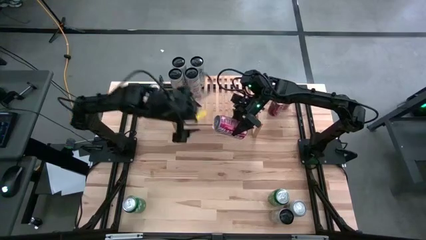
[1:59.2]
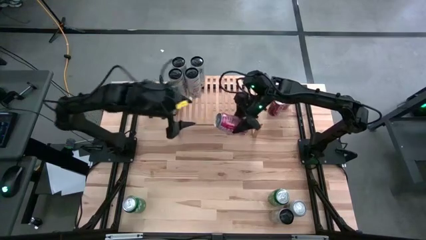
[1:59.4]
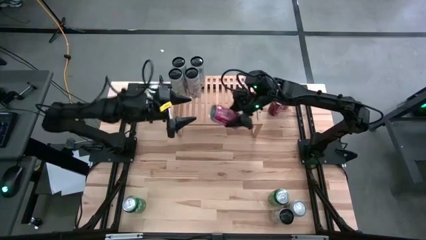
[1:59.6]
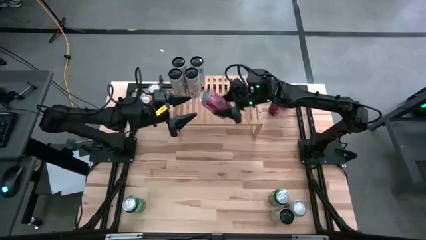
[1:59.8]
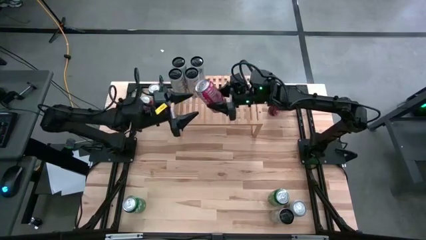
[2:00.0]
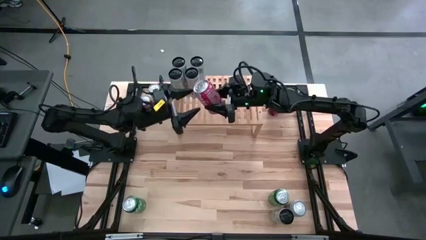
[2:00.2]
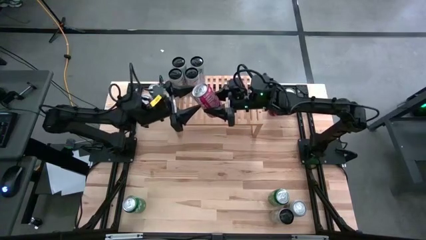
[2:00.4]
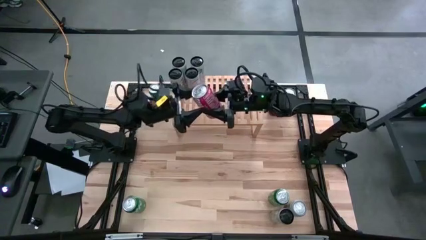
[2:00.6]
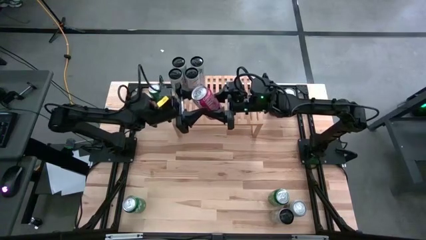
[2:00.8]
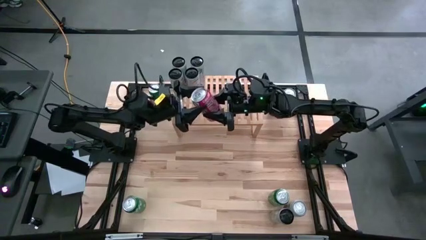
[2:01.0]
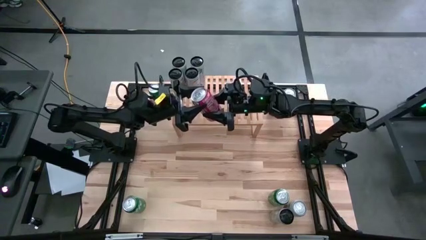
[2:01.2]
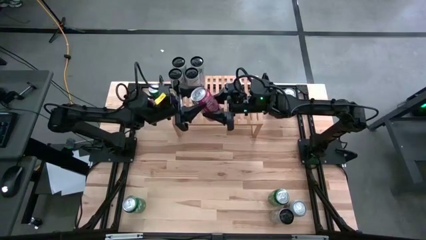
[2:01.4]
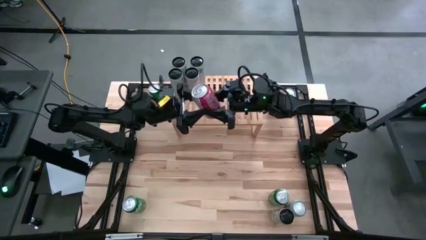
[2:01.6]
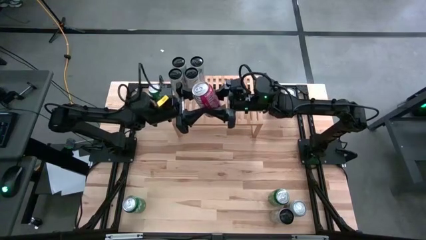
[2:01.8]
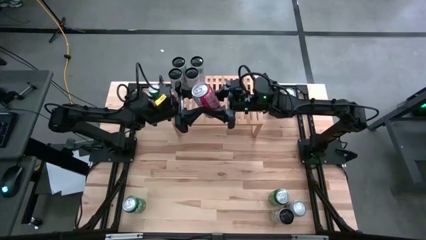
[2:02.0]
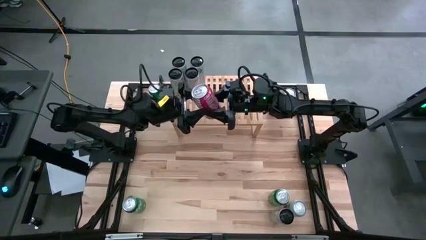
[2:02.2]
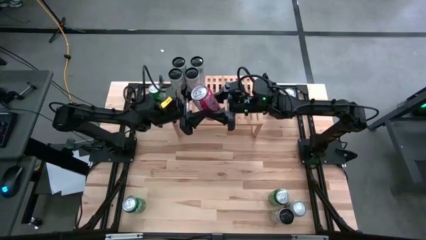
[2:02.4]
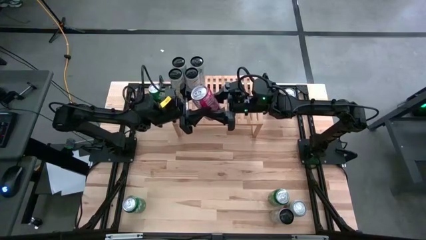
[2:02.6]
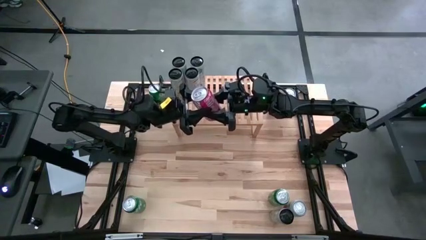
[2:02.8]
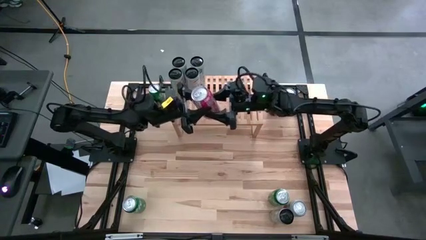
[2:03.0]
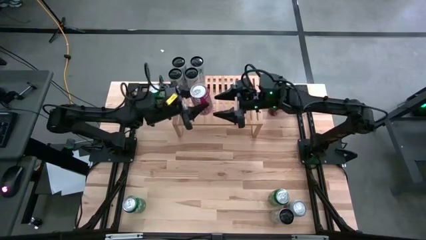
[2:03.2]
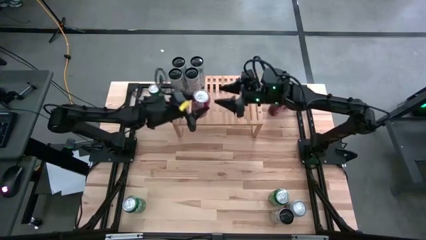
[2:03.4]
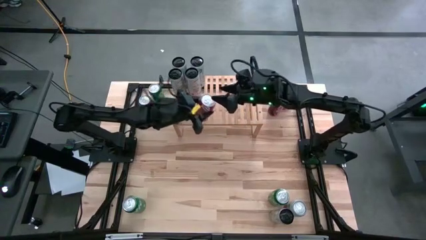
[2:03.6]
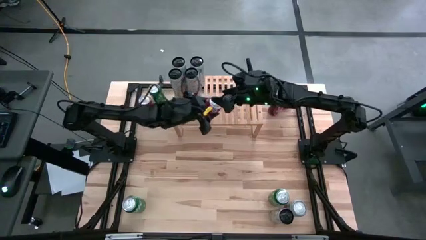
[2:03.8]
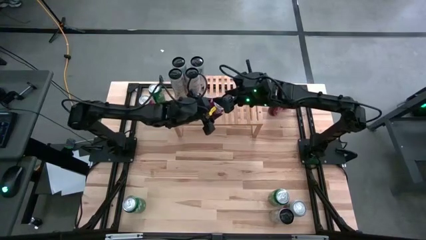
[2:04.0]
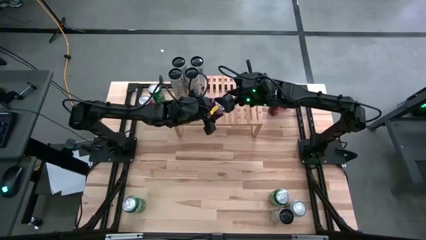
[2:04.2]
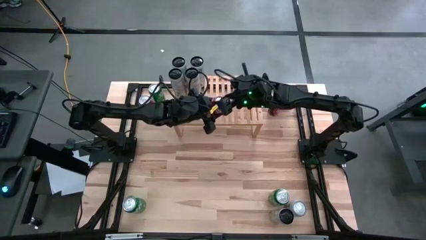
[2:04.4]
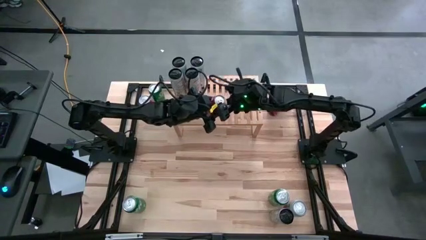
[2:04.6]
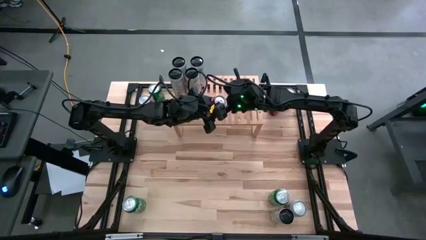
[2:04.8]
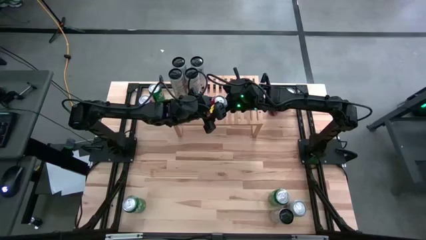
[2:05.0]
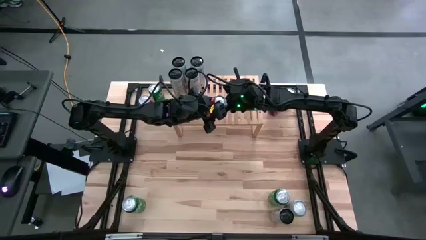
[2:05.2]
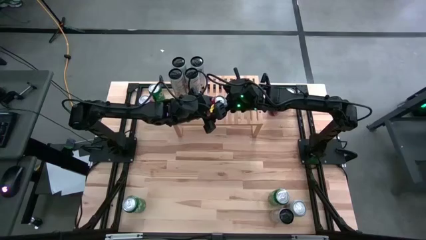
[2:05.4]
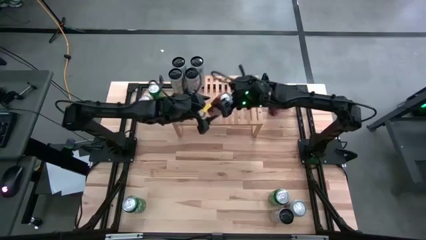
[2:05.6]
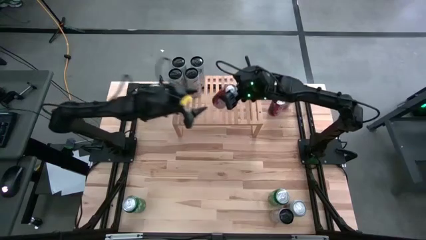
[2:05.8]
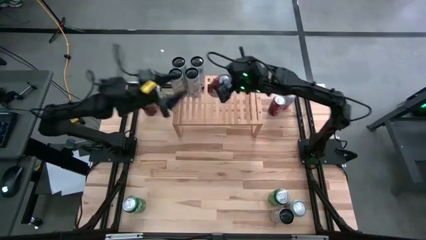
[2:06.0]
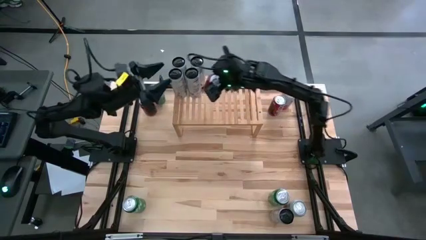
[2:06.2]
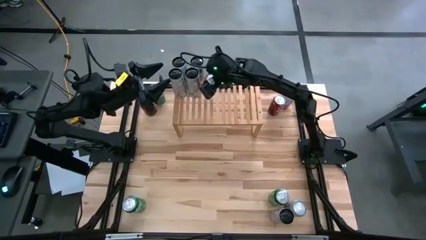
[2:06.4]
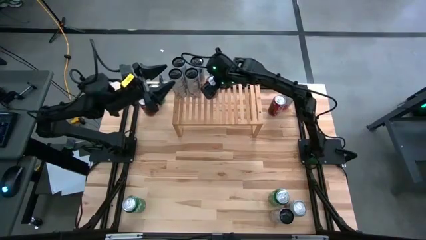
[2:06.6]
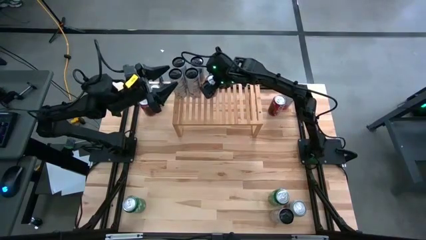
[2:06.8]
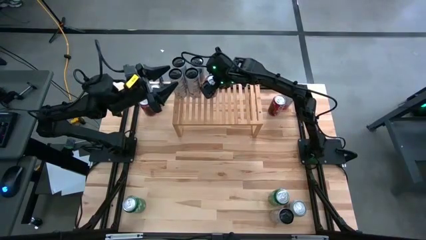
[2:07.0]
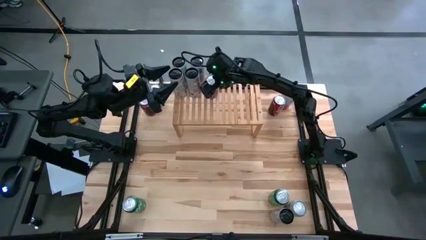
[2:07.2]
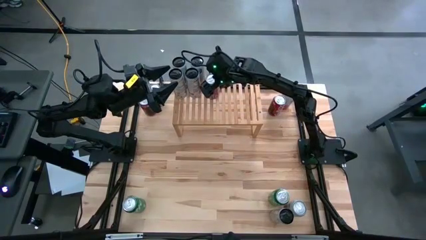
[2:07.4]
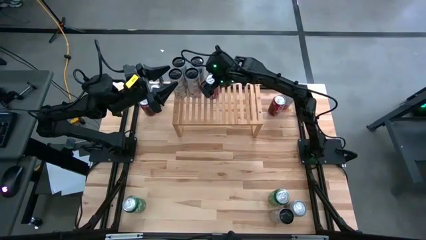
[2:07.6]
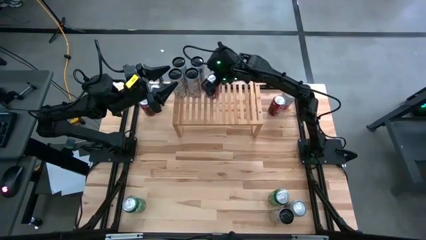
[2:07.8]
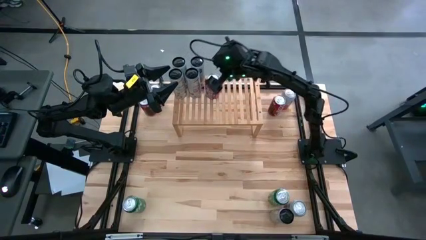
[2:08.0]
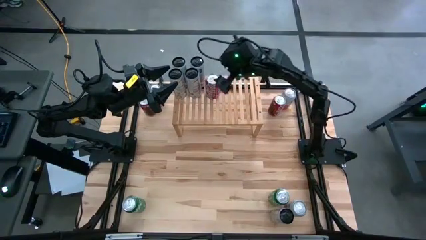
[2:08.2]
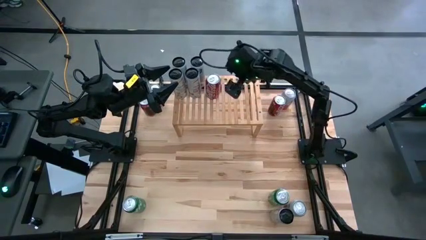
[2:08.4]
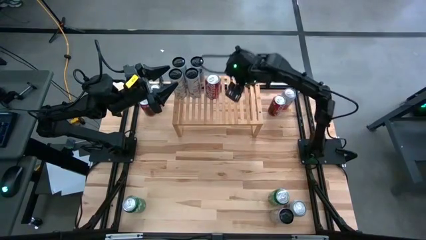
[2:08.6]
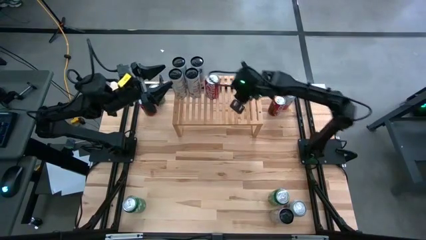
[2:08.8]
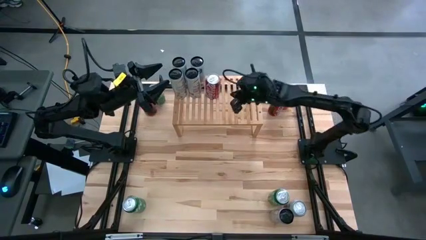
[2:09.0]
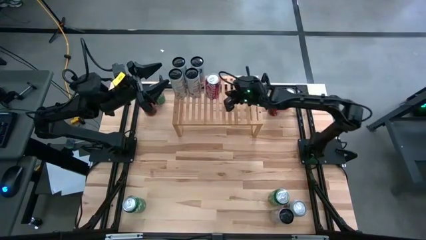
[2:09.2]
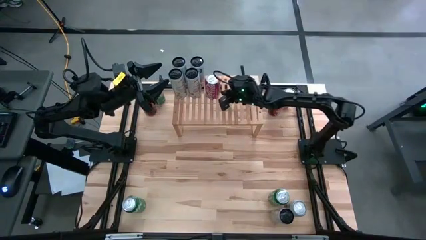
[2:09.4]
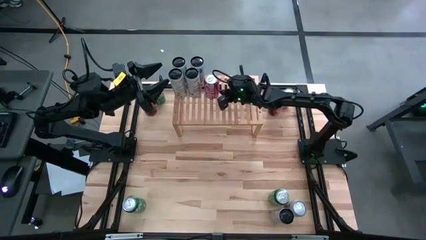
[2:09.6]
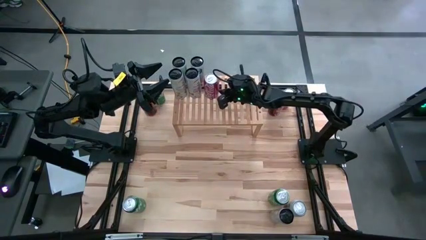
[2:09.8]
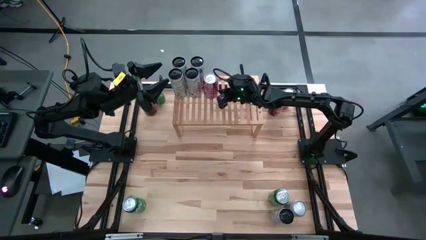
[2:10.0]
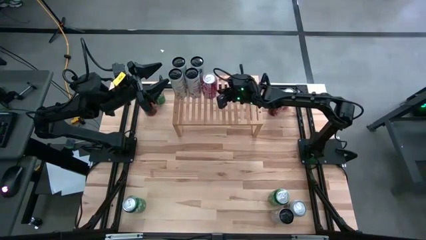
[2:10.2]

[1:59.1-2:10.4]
Task: Place canned beverage on shelf
Put the bottom red soda can on the shelf
